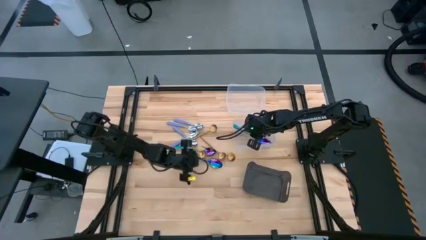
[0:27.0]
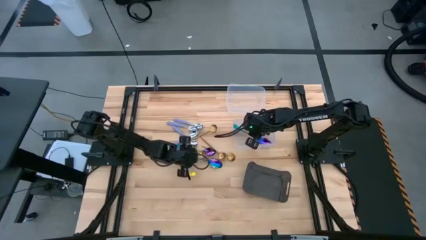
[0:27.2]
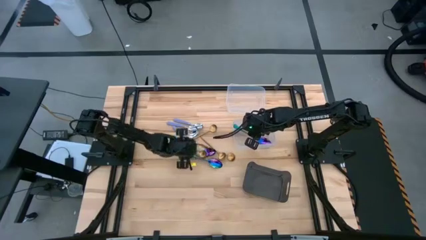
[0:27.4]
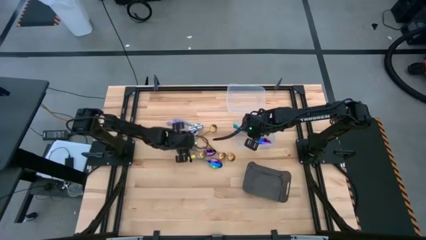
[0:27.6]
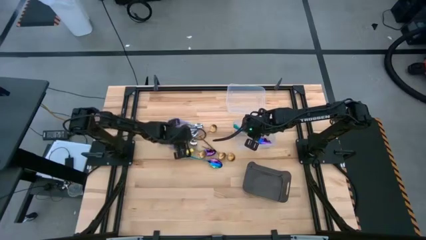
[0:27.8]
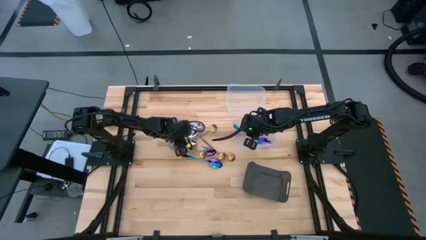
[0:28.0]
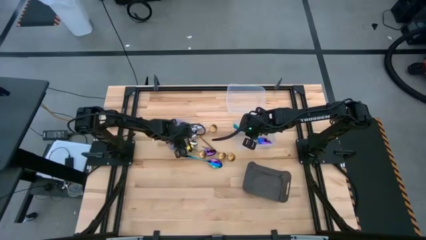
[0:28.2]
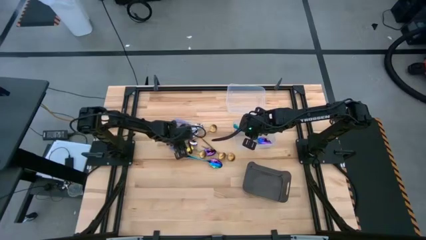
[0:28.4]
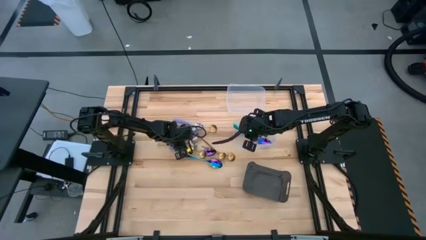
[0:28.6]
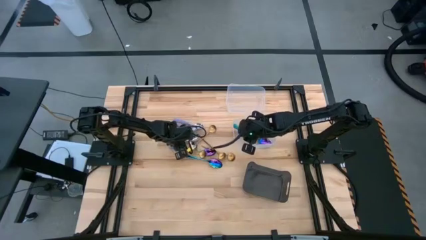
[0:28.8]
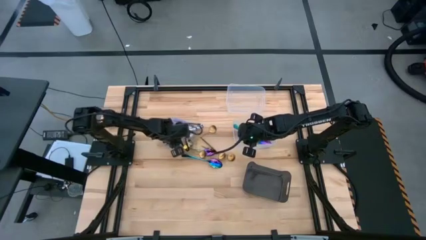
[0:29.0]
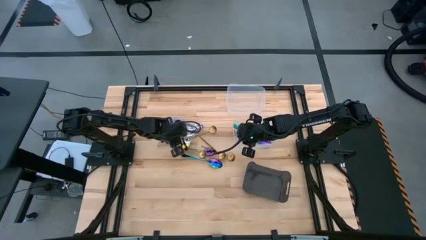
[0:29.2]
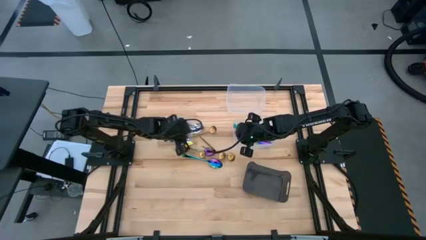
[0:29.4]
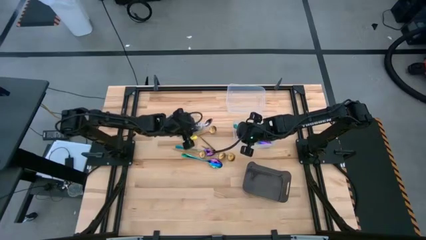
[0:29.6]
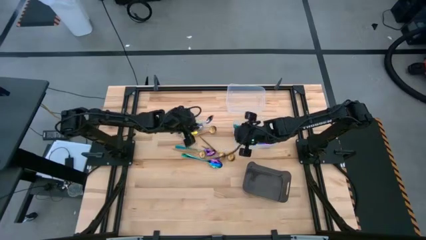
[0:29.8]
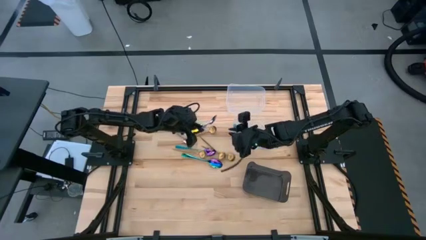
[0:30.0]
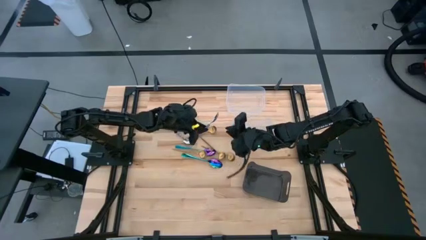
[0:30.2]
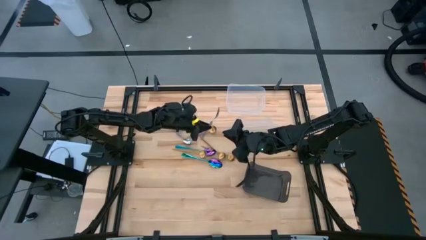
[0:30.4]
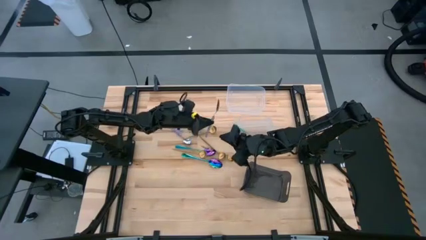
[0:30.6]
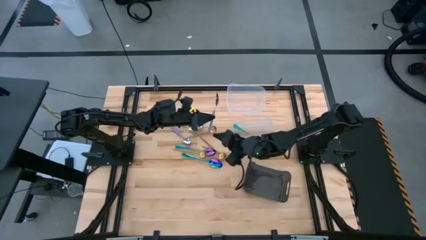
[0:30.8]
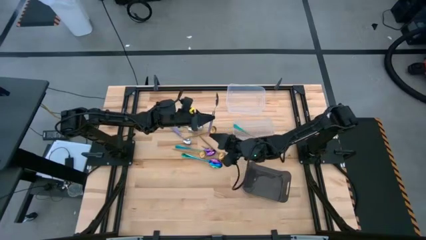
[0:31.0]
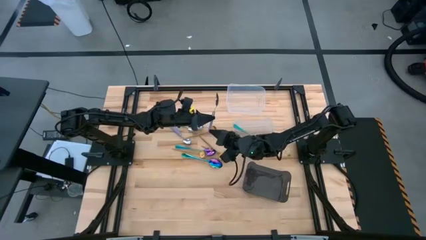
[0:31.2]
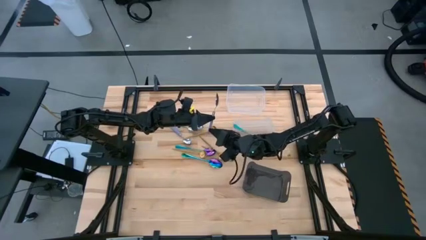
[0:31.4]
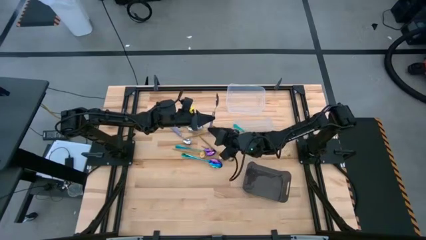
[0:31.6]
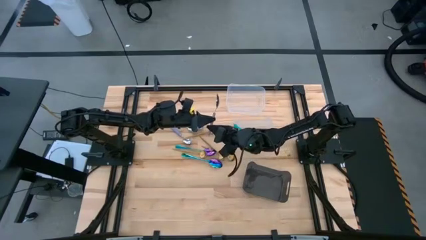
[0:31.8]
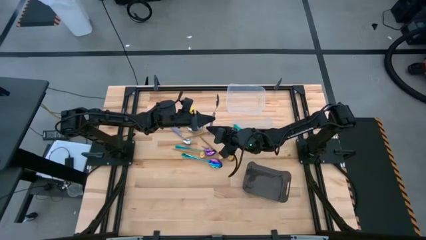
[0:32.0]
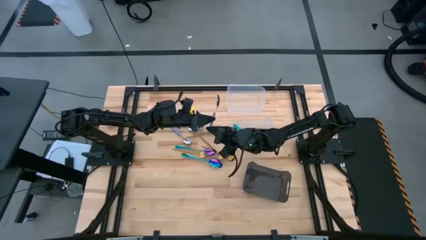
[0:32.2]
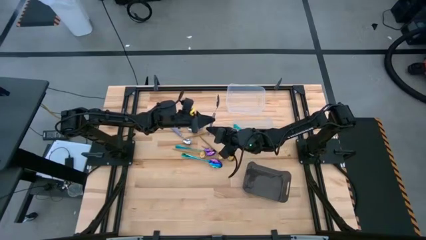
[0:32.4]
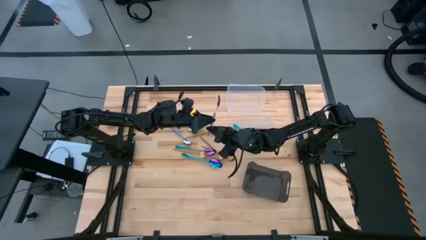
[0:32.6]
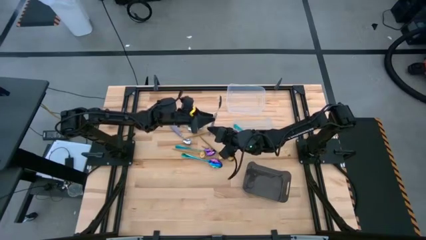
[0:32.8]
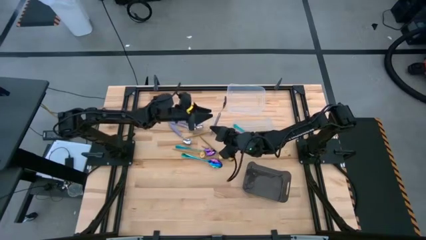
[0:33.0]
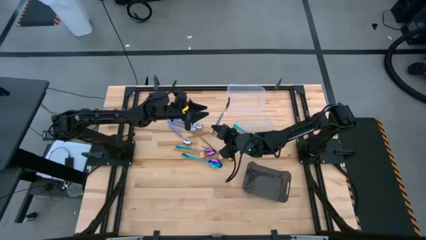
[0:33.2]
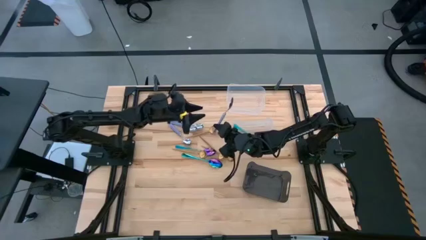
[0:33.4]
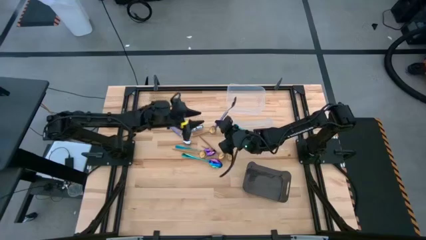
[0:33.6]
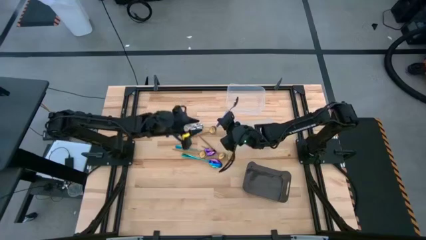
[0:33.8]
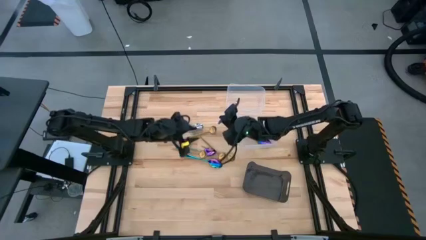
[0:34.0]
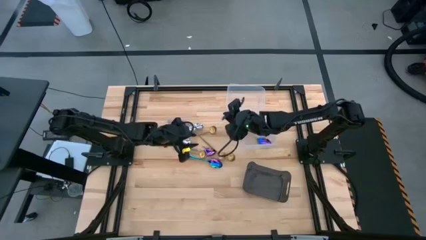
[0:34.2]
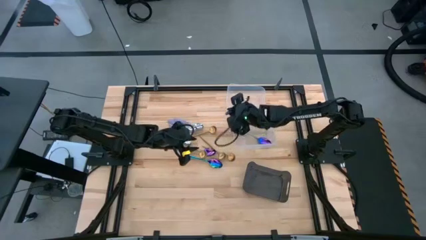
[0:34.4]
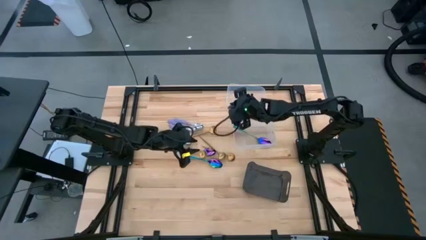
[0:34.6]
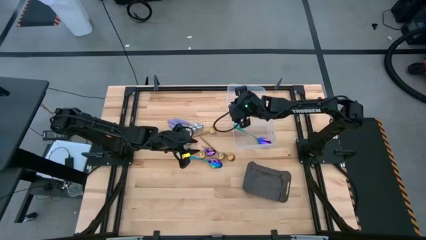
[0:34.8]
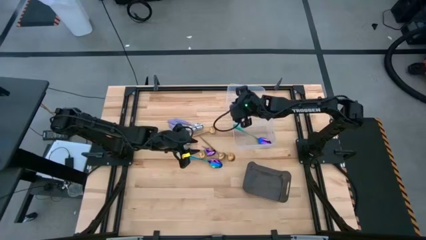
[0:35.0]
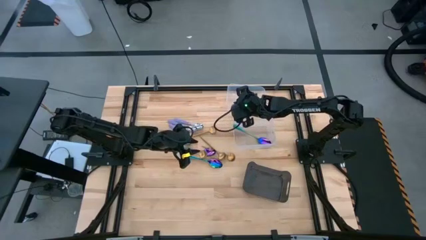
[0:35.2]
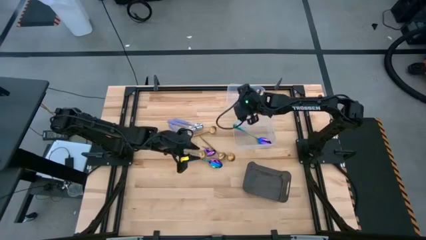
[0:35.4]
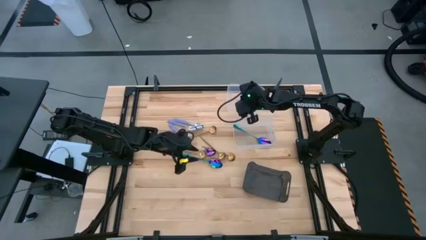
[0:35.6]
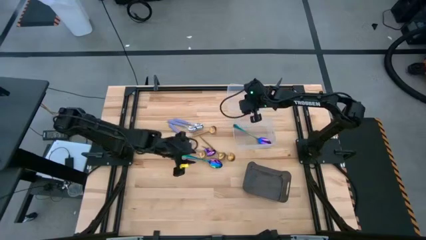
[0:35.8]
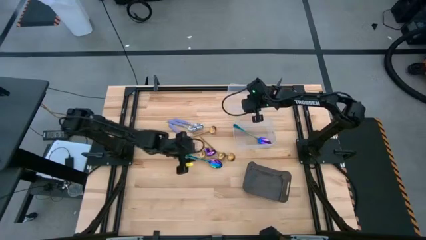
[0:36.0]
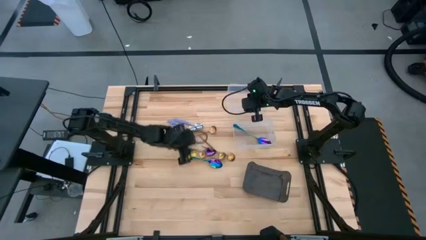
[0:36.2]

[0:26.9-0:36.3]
Task: Sort silverware by color (type)
Put the violet spoon into the top transparent bin

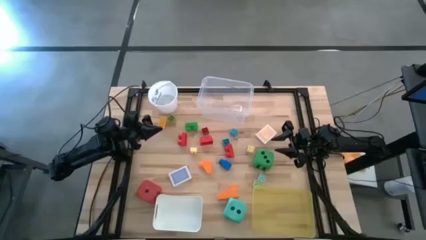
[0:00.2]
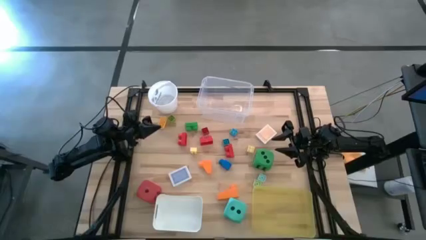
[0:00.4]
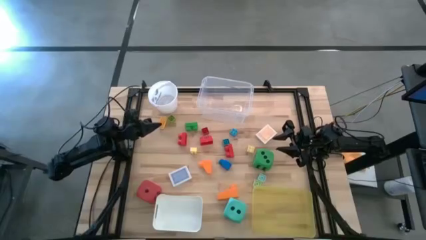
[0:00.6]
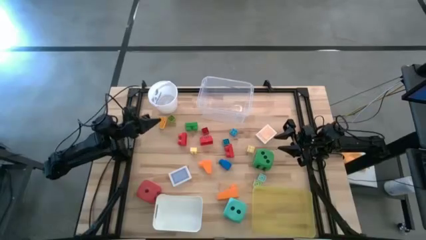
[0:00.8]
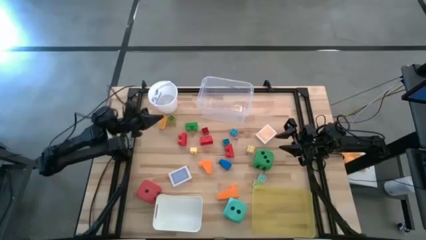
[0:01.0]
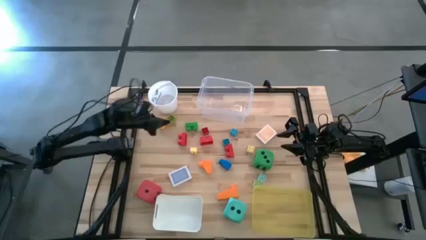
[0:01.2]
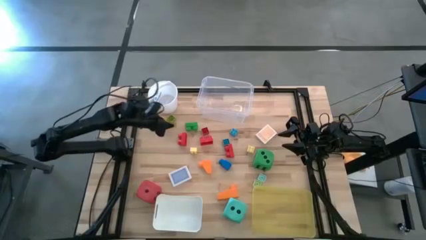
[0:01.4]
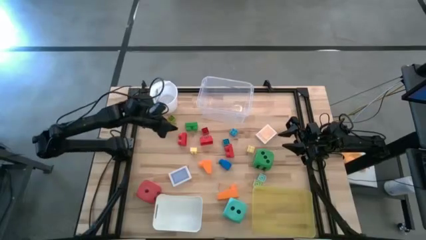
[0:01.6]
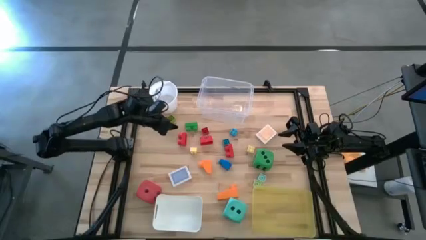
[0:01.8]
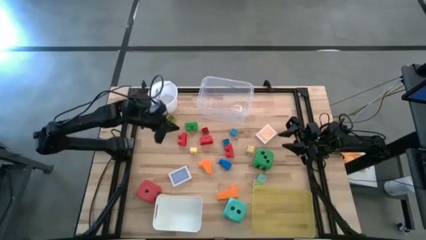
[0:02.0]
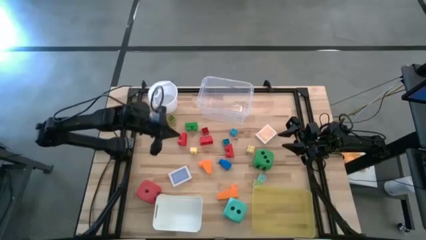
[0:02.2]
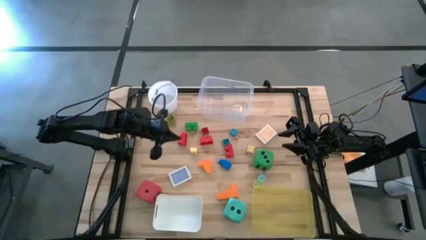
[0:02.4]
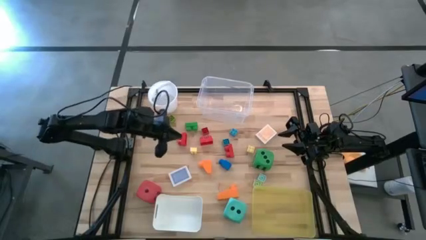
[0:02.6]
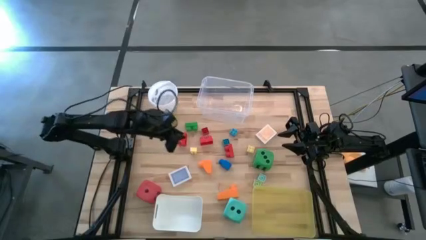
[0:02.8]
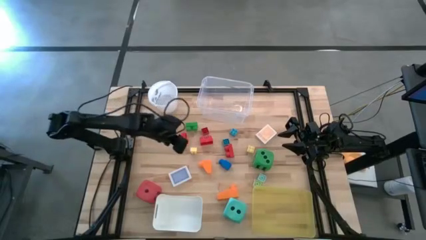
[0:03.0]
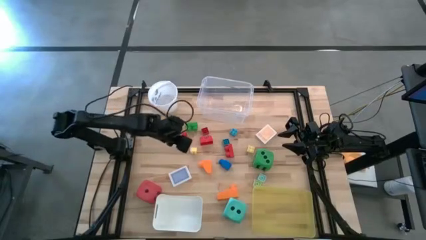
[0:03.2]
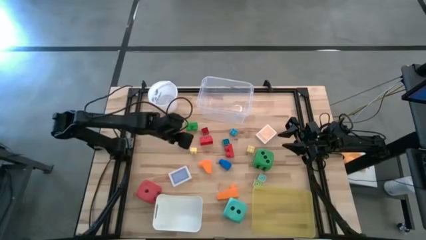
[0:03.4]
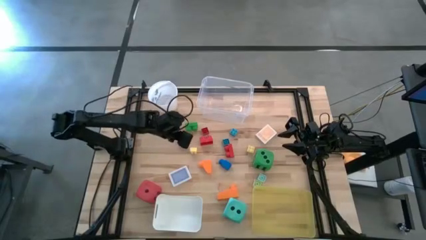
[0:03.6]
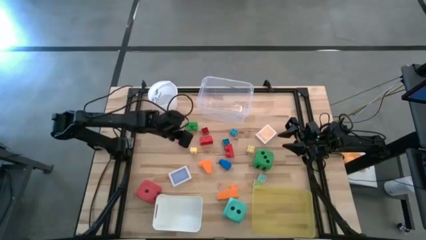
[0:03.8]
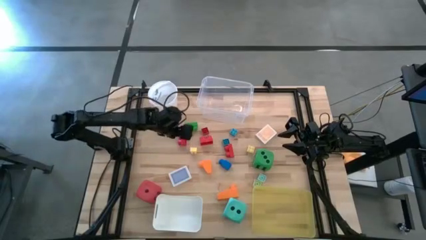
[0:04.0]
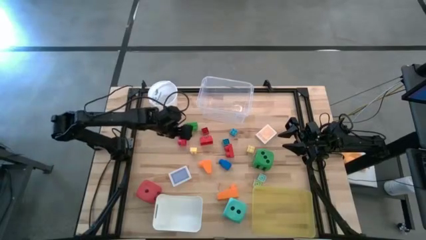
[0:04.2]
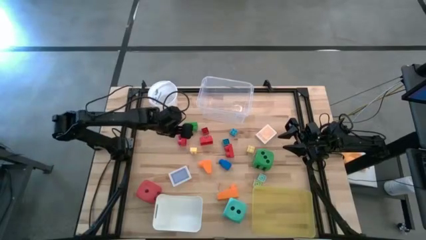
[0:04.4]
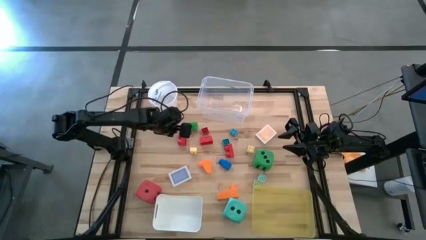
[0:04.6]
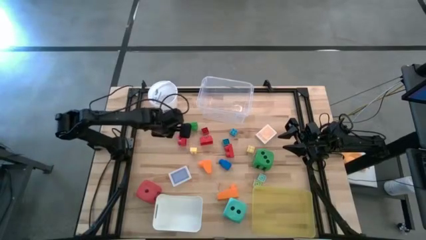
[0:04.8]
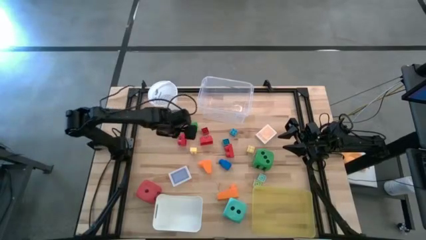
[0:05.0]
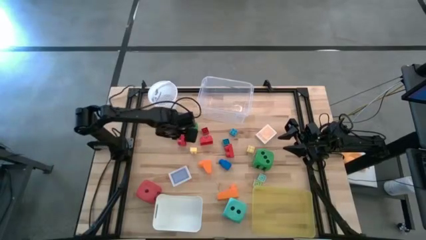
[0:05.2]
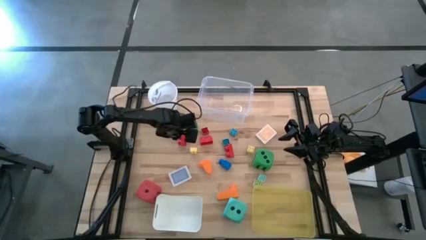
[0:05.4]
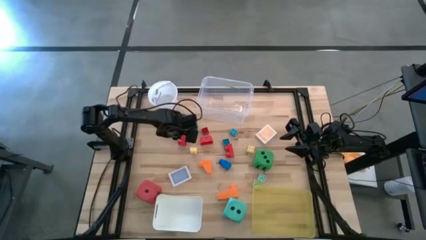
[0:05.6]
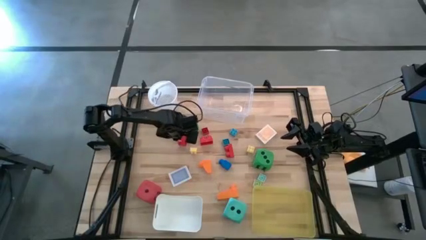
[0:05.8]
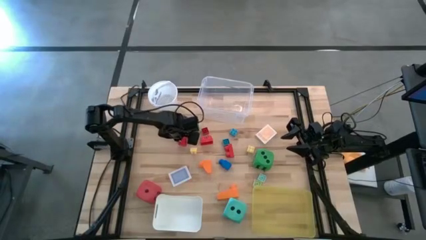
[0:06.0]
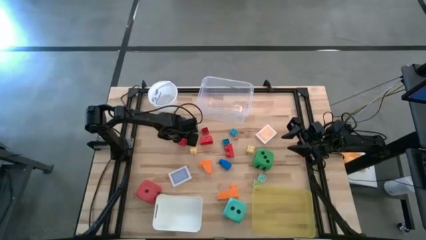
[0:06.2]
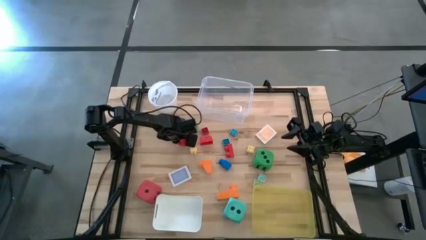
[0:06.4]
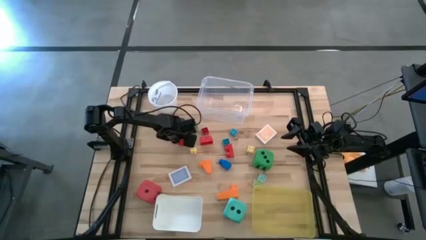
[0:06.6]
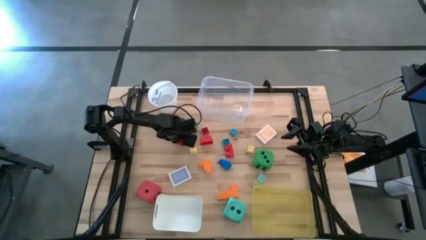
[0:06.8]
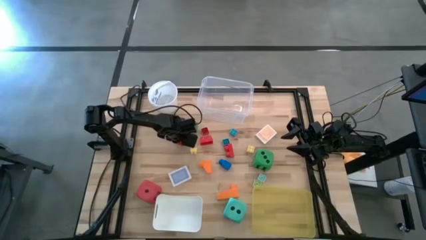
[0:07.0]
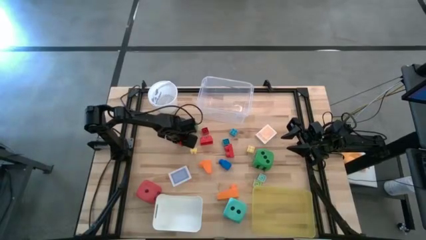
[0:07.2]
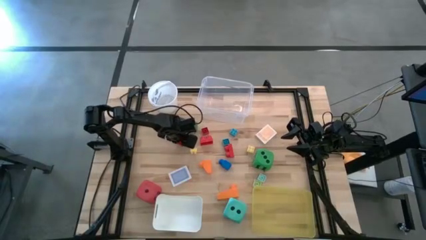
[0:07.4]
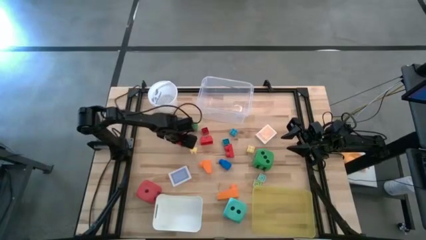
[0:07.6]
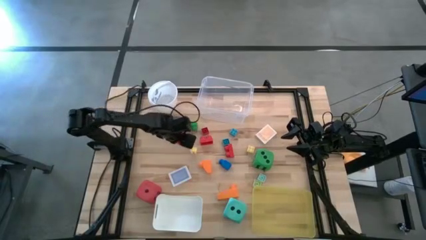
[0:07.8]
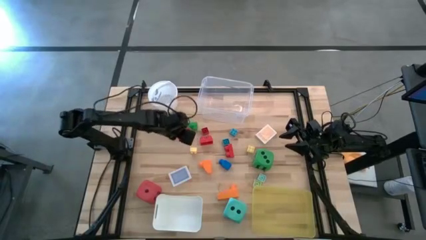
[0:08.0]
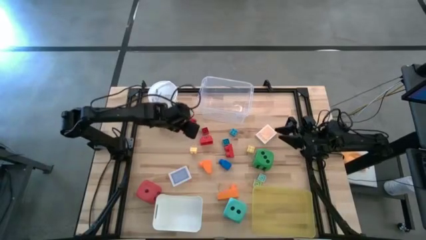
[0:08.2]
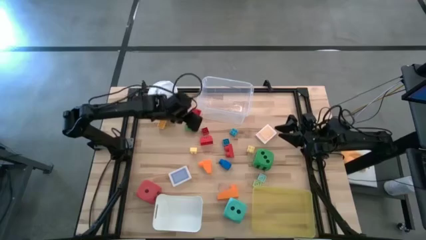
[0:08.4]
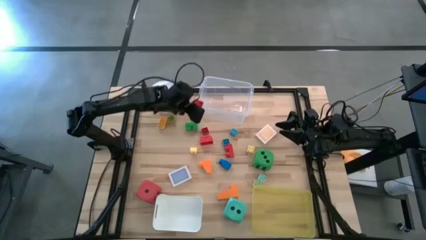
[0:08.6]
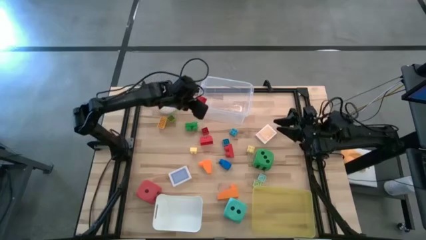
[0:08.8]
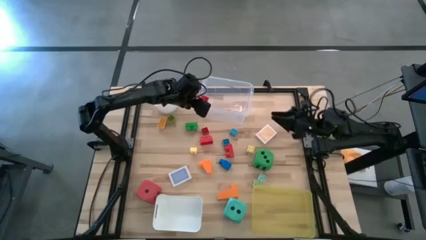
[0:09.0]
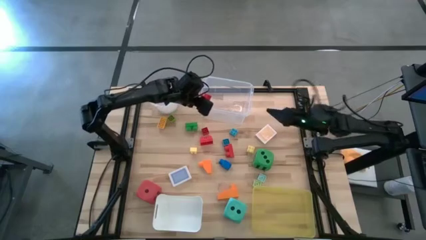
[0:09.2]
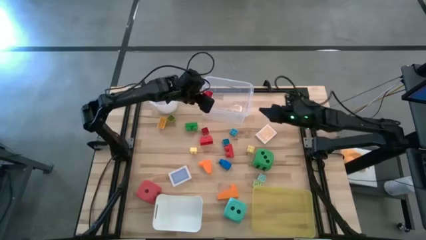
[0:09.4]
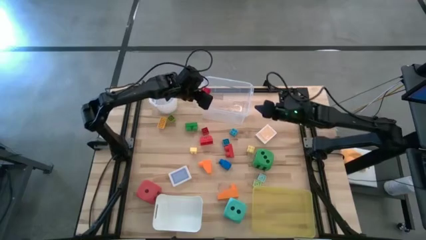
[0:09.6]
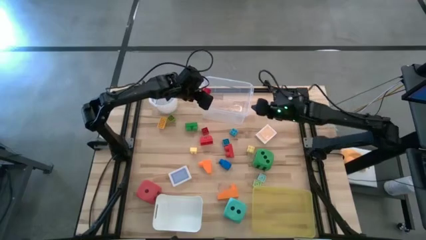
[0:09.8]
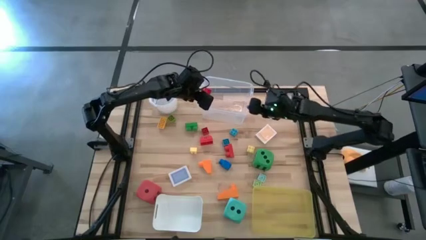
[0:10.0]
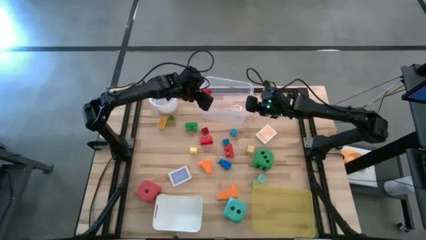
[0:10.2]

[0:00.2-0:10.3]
Task: Pick & Place Toys
Put the red game piece into the transparent bin
